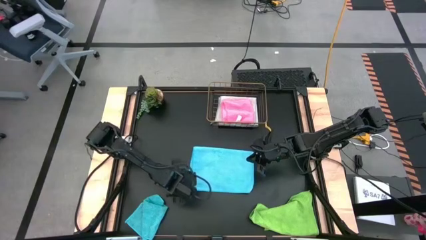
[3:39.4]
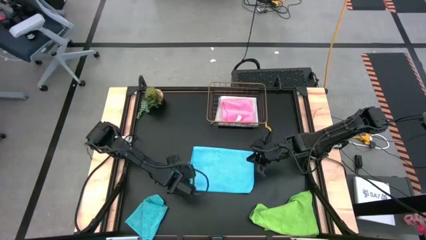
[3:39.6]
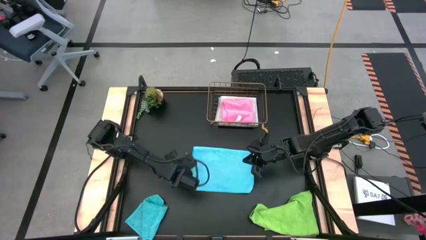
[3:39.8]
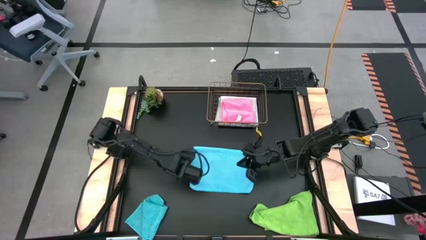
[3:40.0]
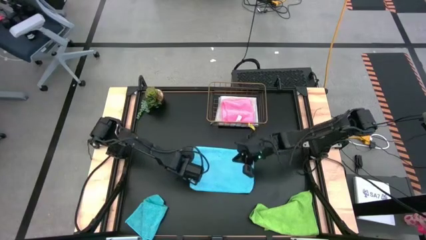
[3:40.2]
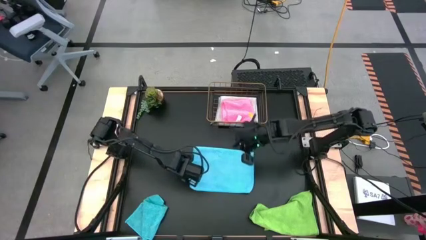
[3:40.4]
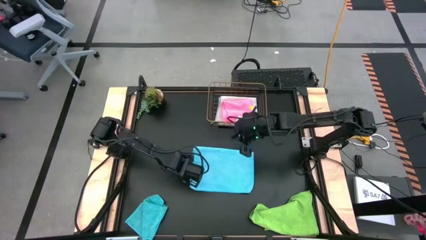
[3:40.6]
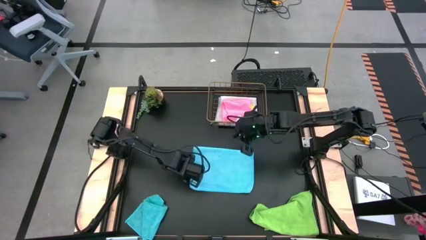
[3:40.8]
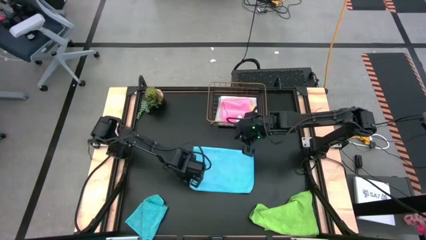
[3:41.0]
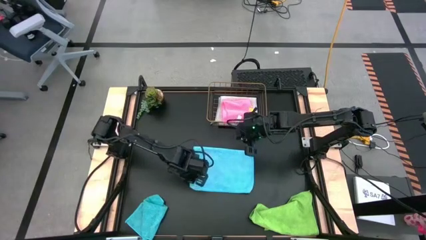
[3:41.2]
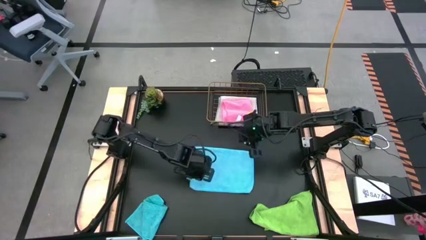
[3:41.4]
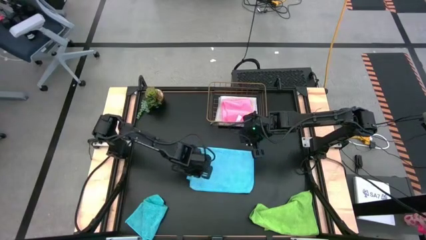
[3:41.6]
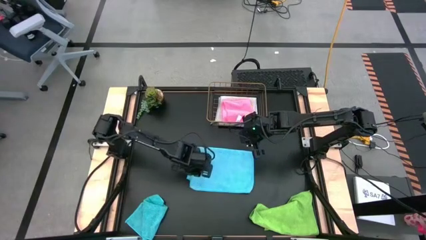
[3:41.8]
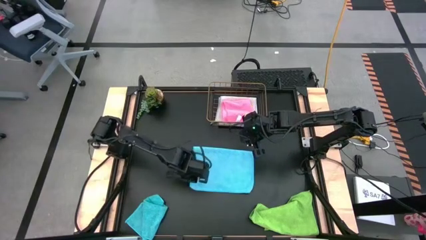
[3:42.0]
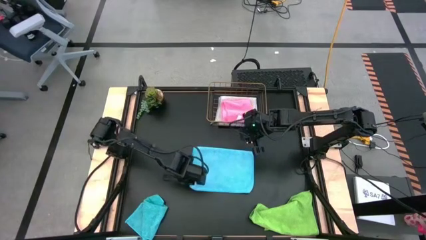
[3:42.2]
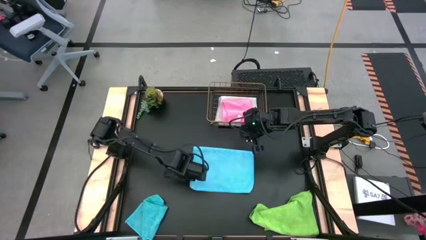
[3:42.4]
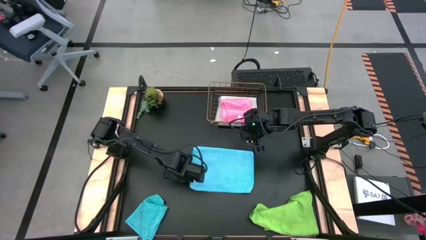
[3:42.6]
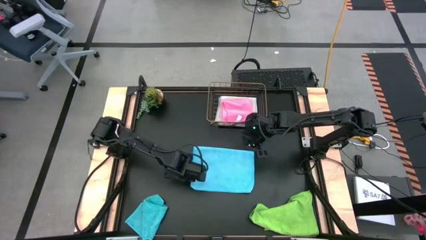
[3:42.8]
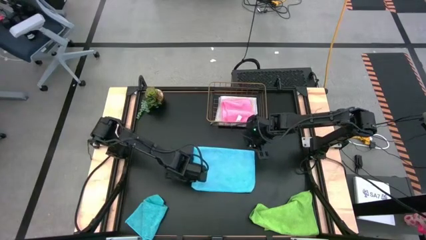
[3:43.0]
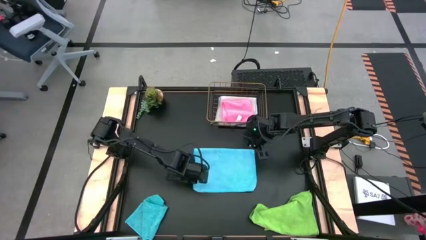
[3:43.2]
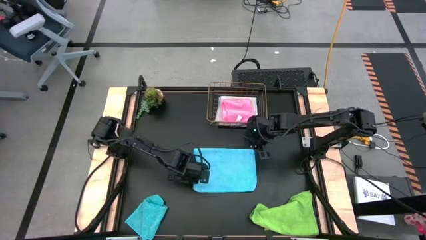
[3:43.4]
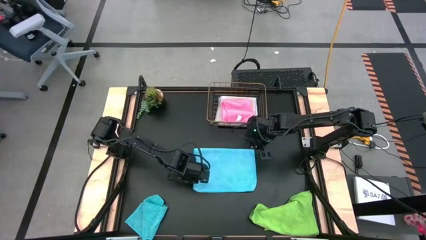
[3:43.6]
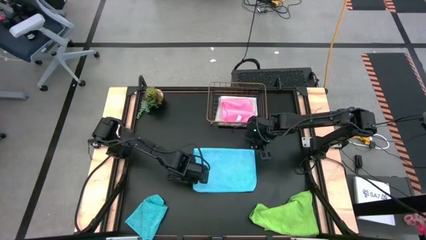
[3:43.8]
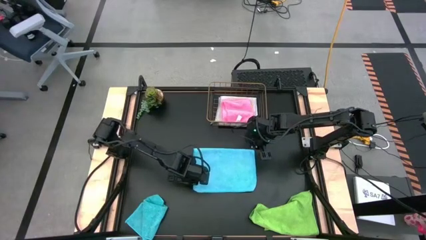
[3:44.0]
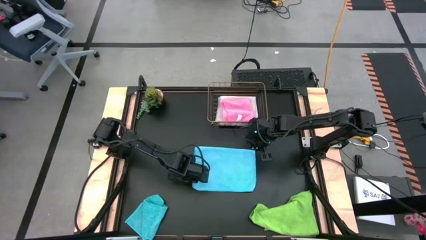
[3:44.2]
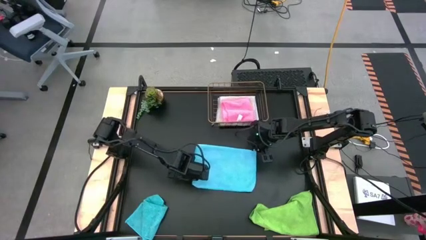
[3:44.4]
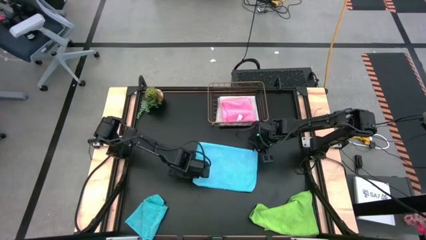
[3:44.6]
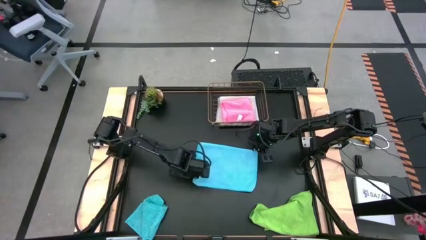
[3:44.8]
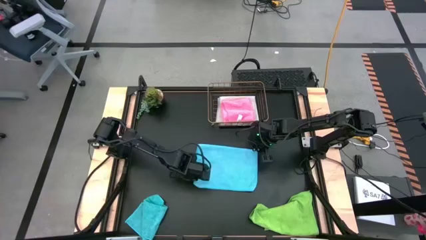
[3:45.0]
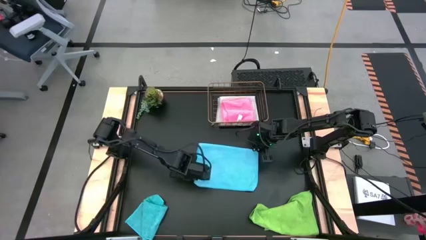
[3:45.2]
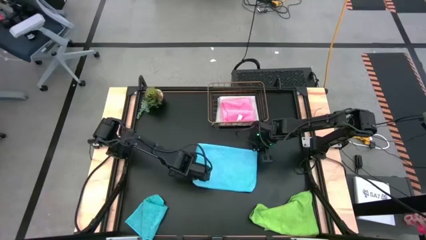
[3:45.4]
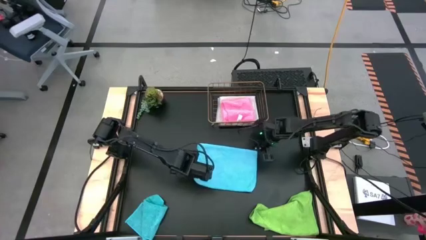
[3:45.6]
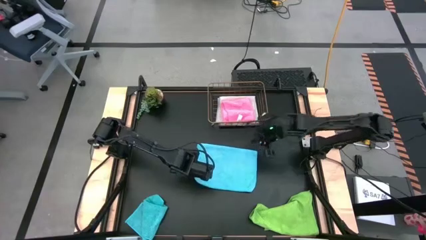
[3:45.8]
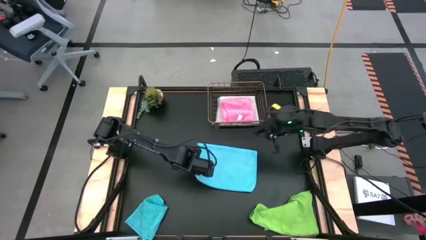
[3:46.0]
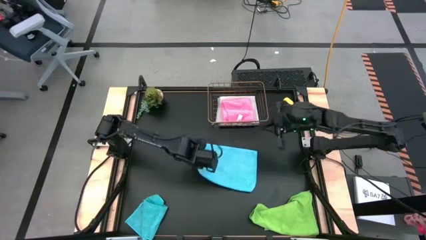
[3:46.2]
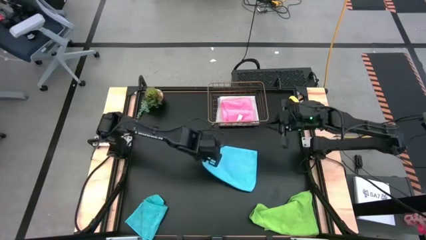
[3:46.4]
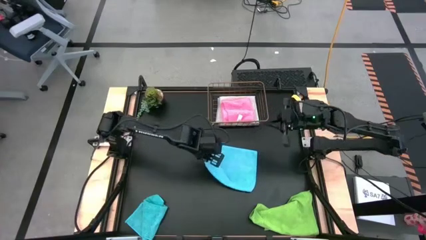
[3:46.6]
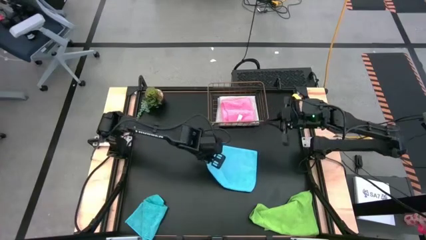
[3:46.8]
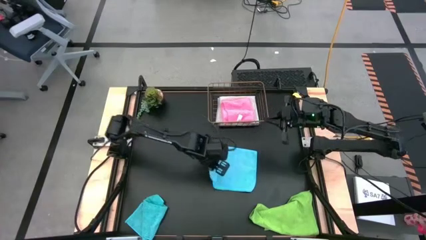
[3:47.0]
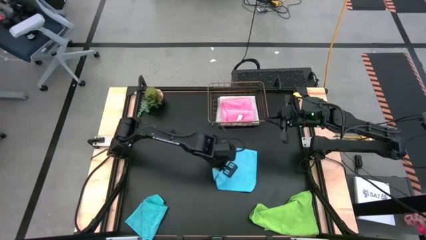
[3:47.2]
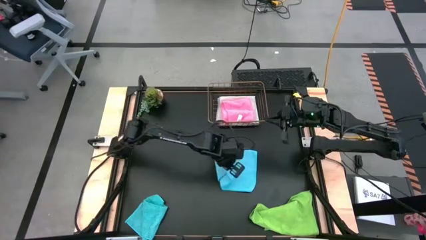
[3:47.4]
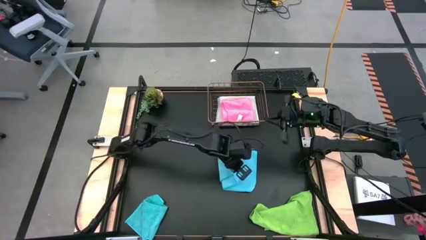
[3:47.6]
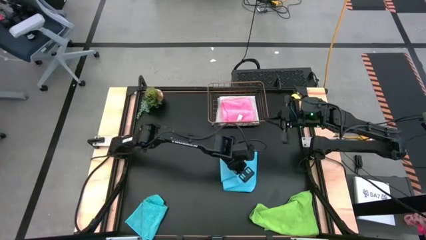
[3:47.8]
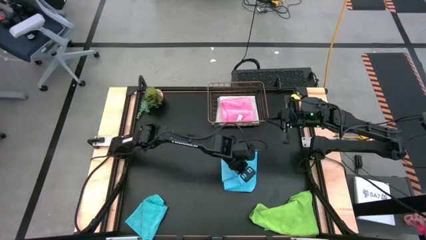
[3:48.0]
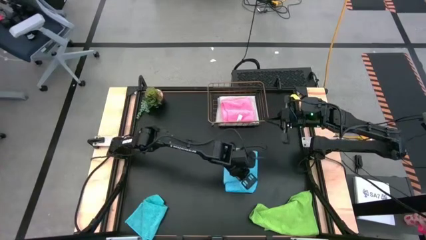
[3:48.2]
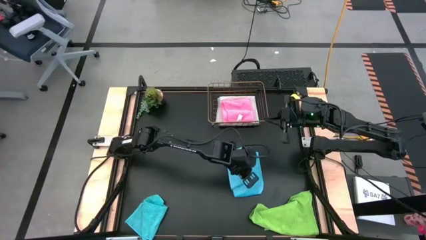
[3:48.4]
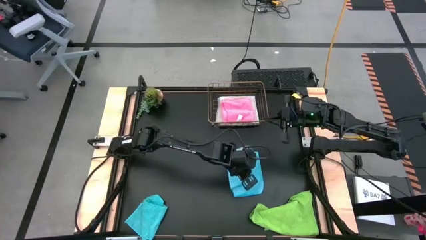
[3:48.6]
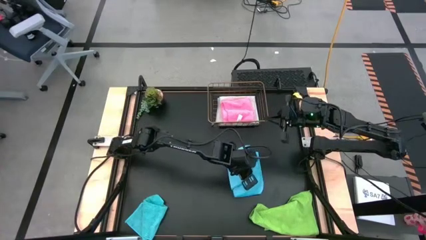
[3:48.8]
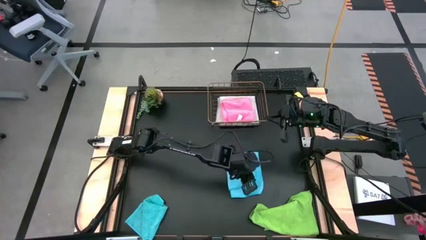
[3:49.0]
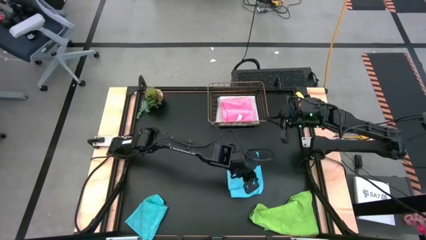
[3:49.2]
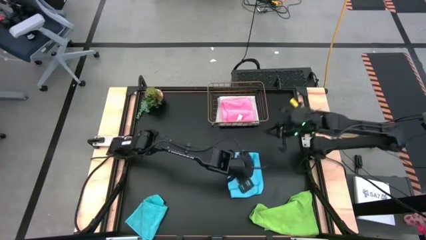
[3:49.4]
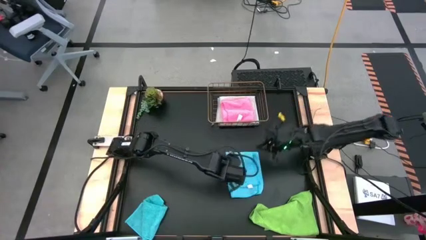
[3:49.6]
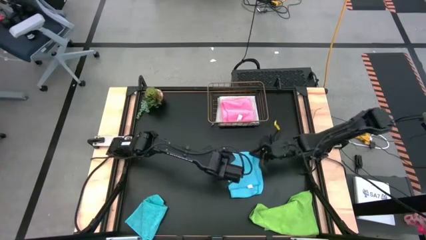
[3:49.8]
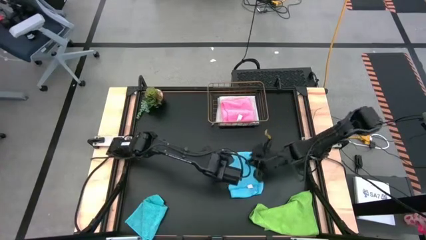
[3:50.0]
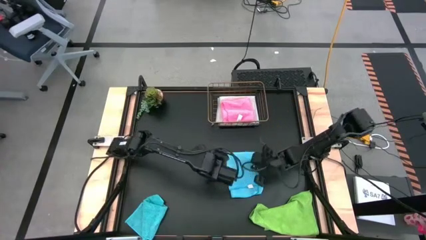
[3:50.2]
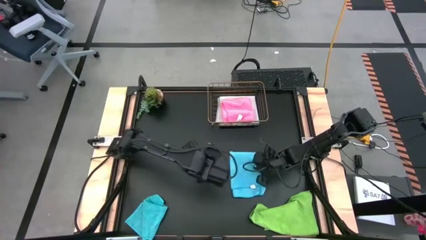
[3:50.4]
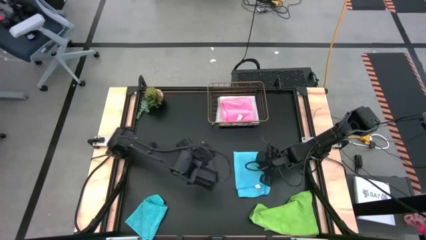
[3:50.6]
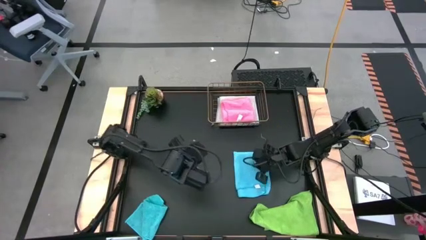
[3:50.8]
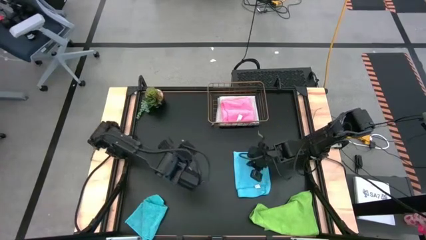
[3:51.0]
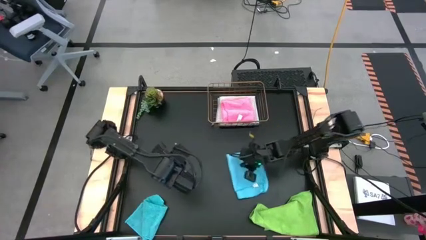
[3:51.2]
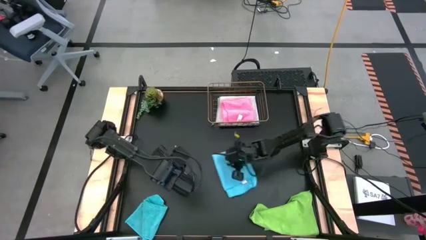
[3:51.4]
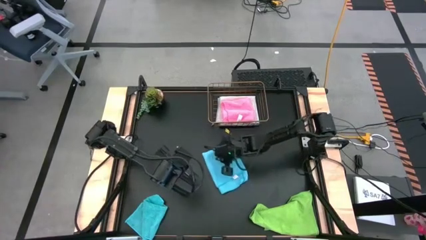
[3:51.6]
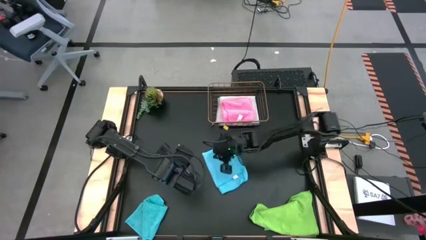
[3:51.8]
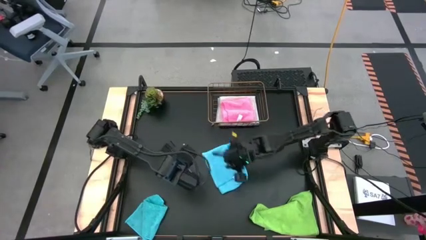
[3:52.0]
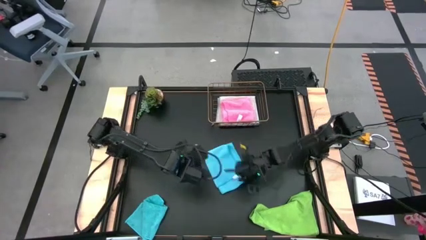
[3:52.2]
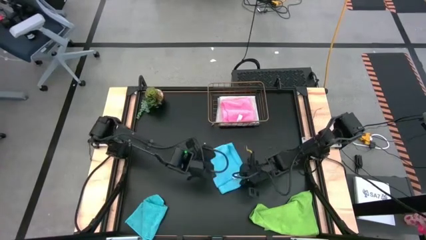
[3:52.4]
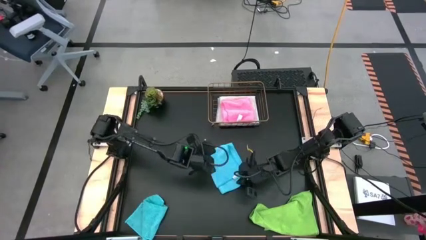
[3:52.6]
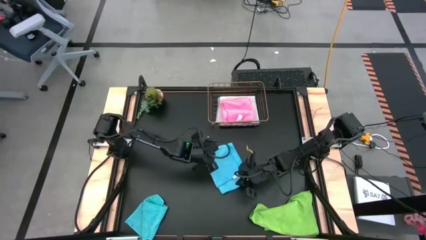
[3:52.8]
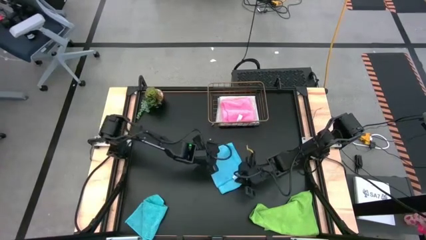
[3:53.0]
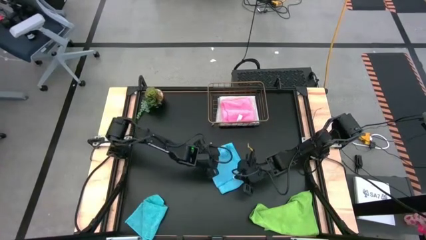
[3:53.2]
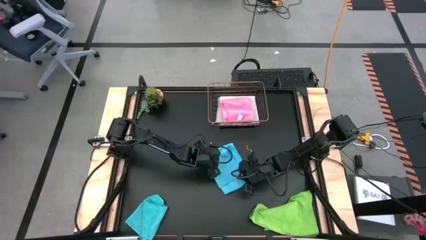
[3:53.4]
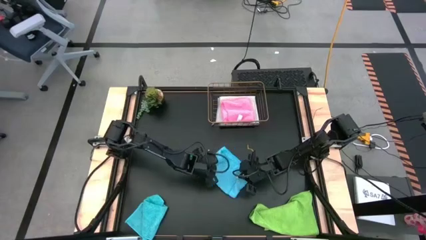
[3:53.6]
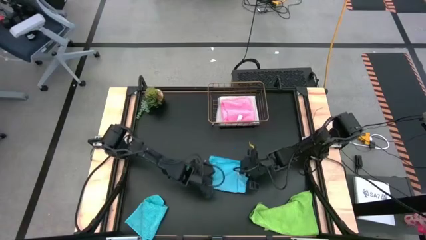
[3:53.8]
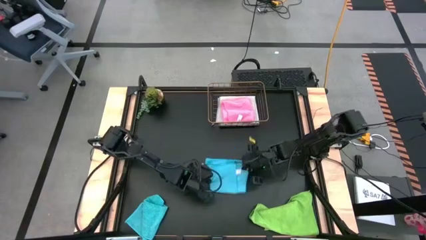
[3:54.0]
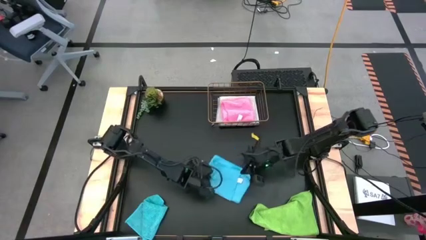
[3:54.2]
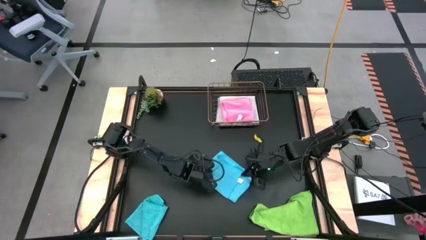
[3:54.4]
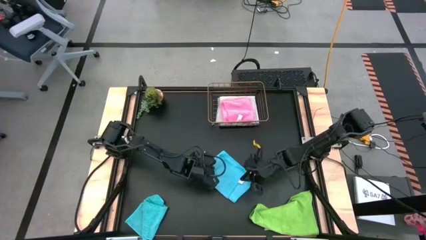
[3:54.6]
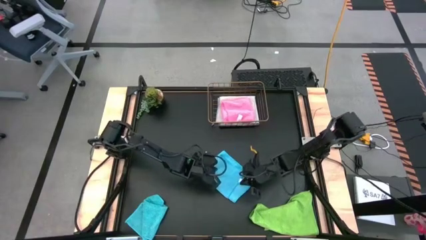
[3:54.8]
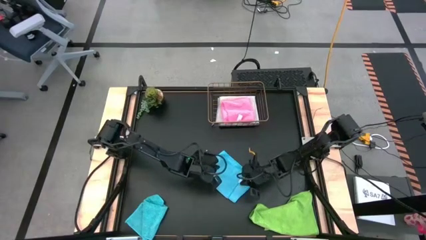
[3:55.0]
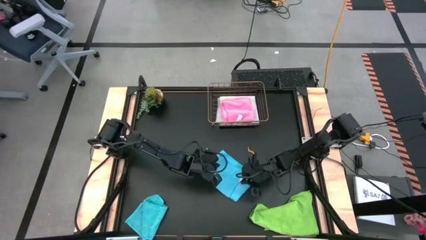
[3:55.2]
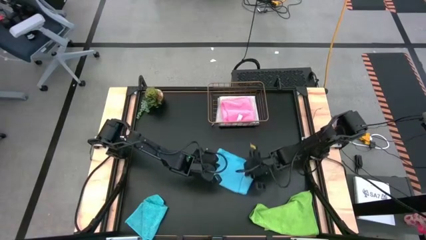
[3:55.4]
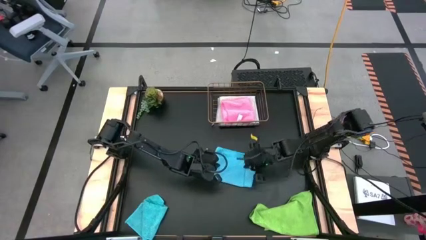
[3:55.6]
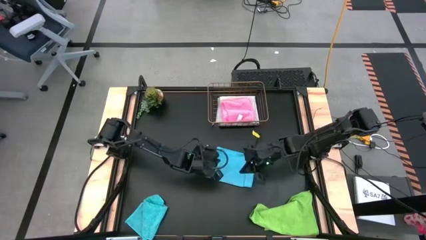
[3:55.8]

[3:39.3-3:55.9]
Task: Fold microfiber towels
Fold the right blue towel
